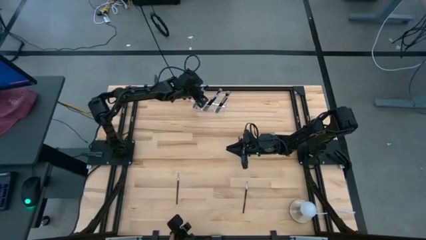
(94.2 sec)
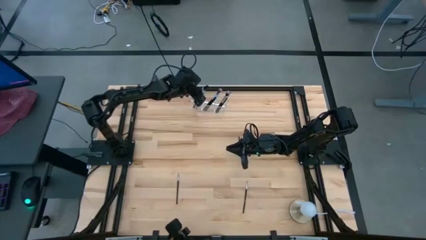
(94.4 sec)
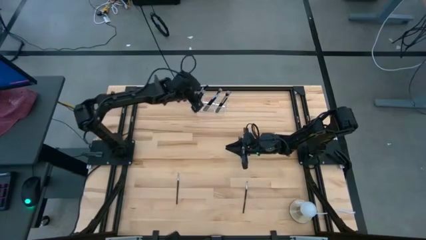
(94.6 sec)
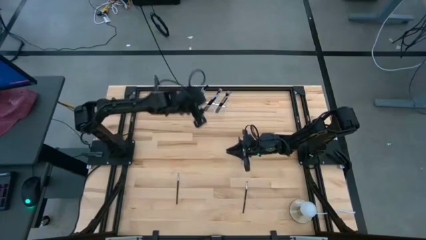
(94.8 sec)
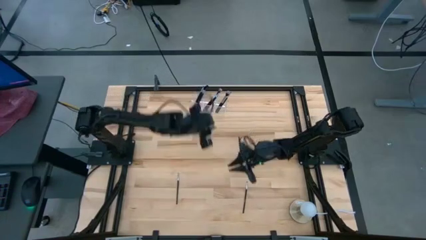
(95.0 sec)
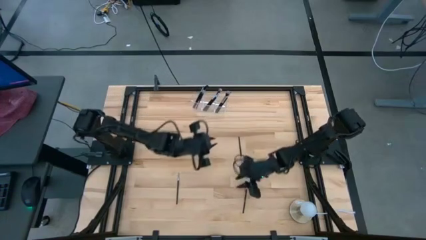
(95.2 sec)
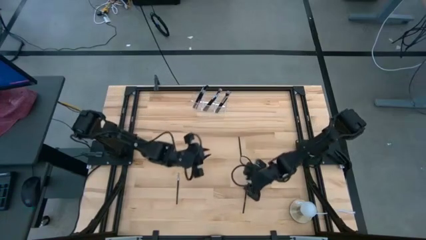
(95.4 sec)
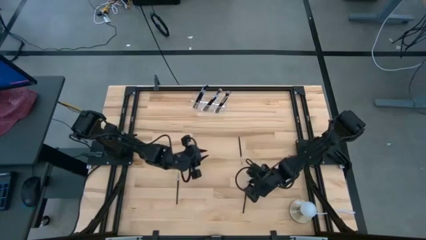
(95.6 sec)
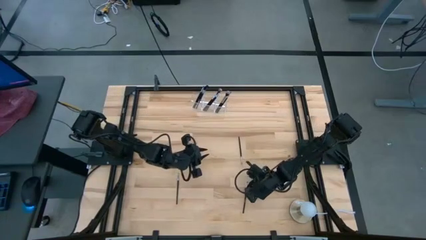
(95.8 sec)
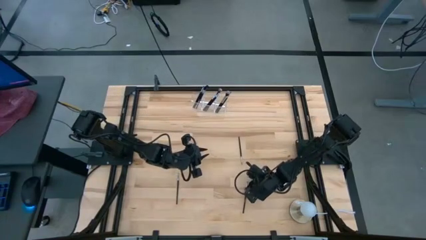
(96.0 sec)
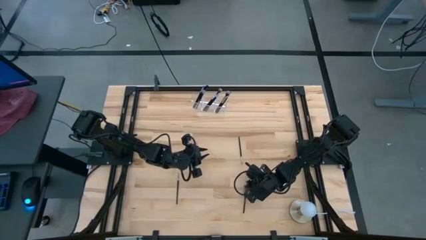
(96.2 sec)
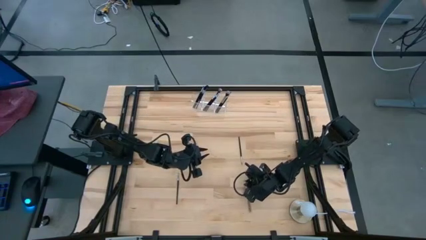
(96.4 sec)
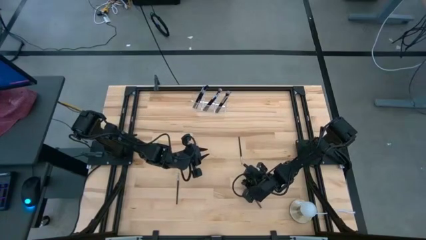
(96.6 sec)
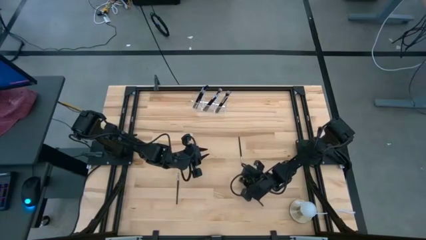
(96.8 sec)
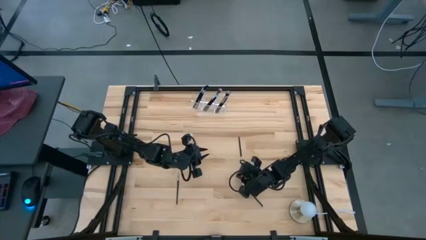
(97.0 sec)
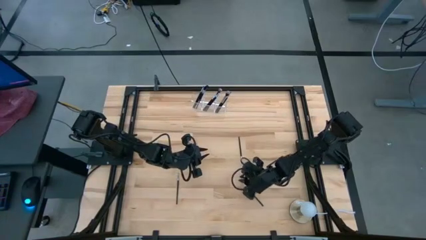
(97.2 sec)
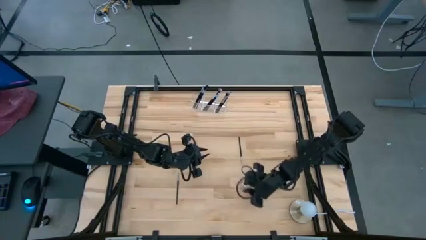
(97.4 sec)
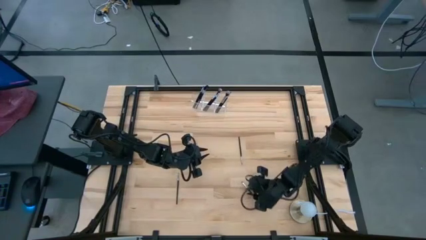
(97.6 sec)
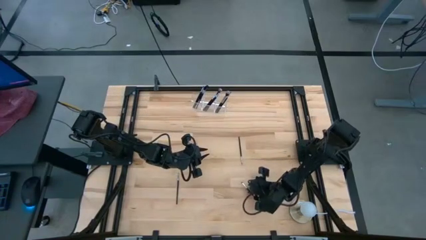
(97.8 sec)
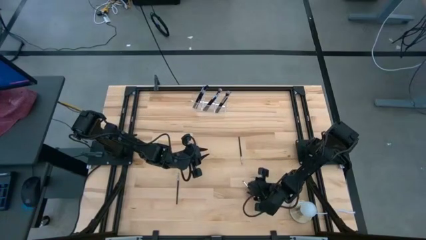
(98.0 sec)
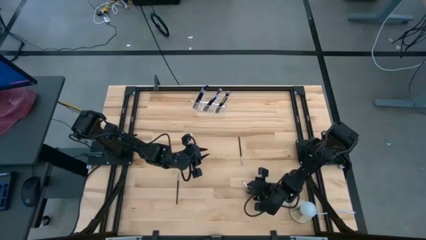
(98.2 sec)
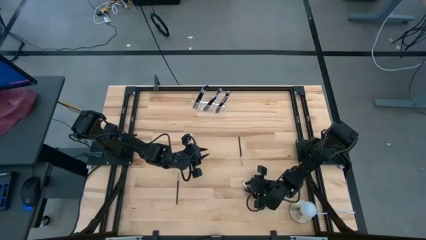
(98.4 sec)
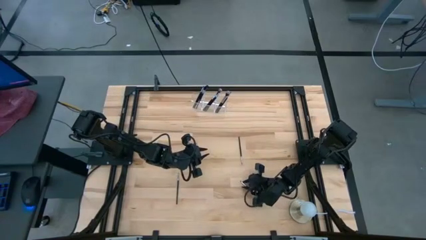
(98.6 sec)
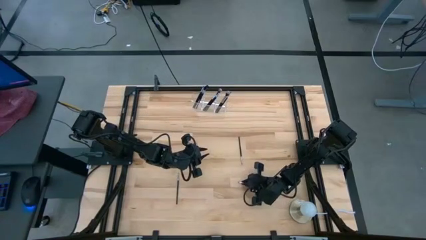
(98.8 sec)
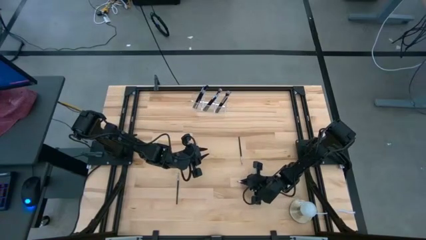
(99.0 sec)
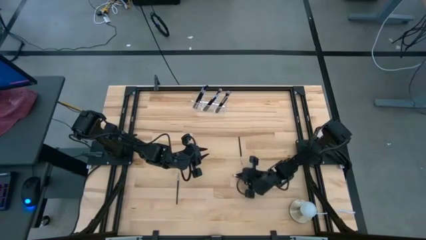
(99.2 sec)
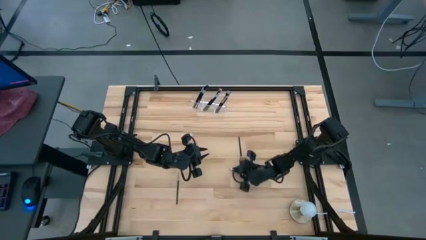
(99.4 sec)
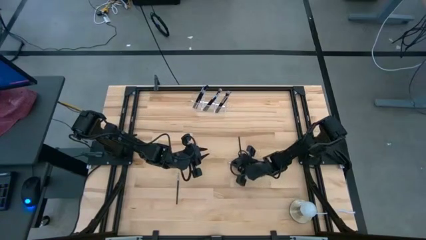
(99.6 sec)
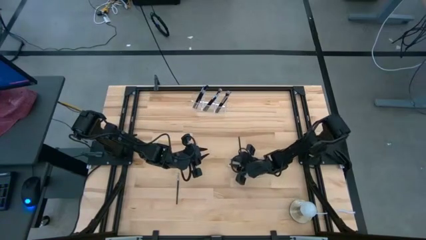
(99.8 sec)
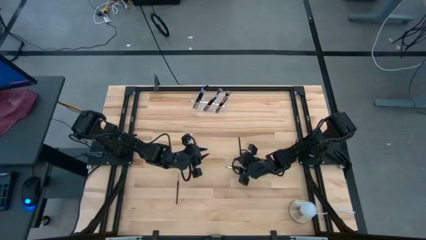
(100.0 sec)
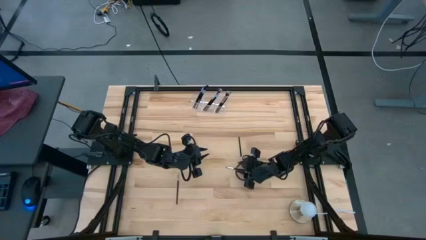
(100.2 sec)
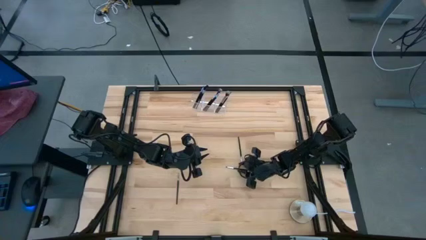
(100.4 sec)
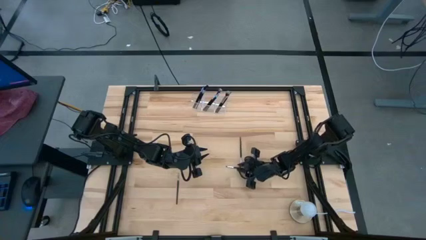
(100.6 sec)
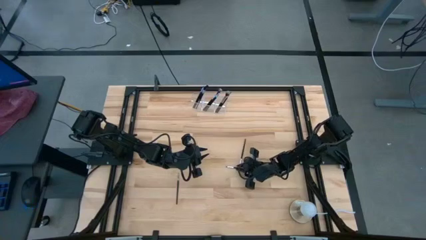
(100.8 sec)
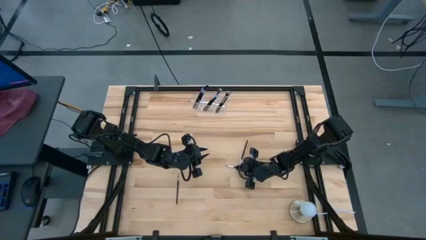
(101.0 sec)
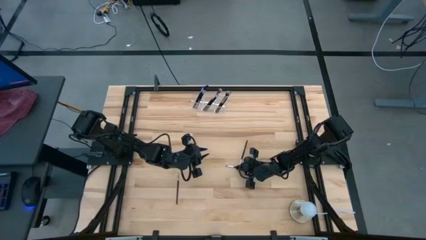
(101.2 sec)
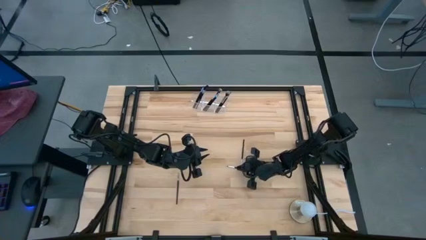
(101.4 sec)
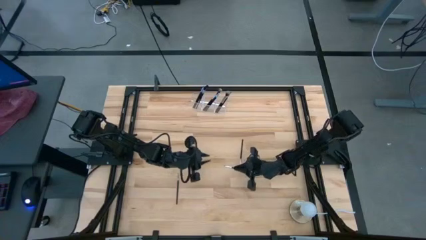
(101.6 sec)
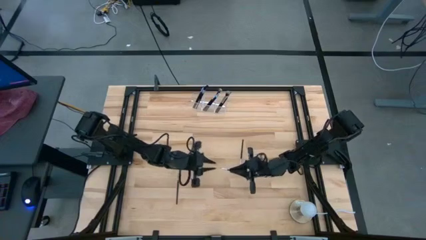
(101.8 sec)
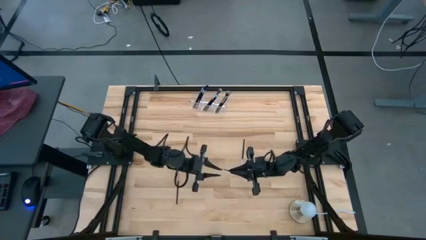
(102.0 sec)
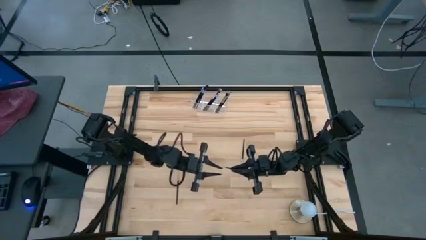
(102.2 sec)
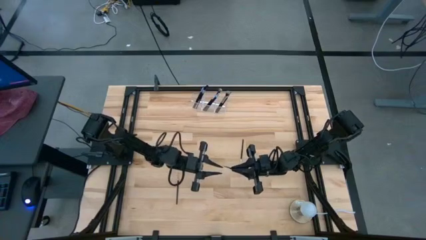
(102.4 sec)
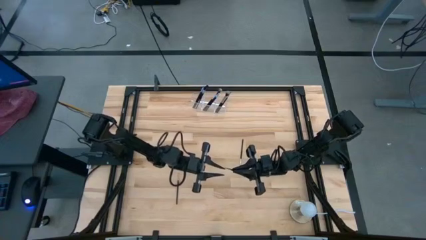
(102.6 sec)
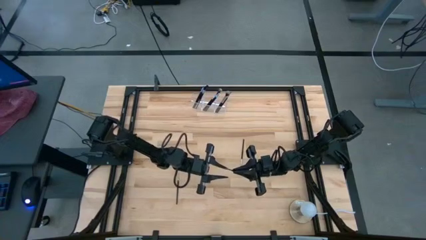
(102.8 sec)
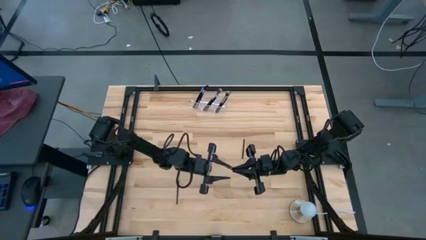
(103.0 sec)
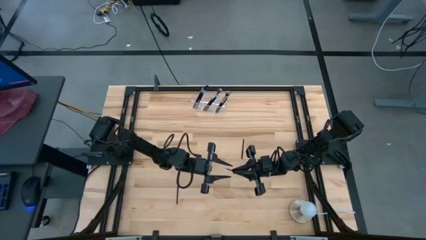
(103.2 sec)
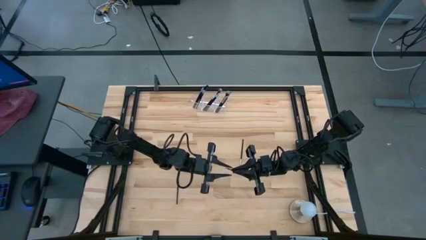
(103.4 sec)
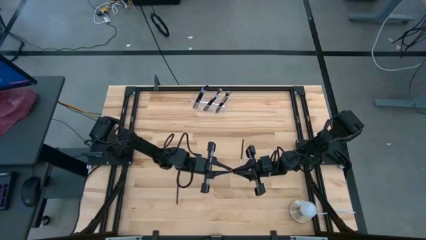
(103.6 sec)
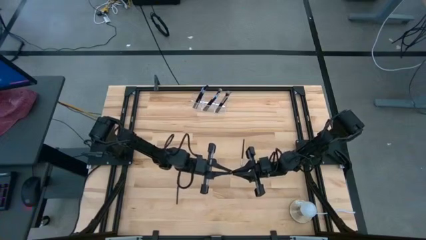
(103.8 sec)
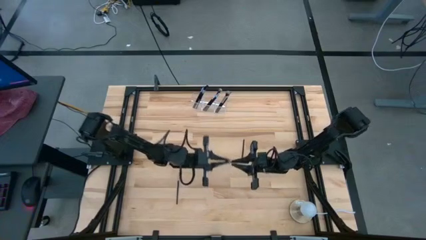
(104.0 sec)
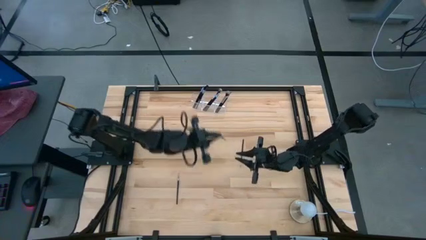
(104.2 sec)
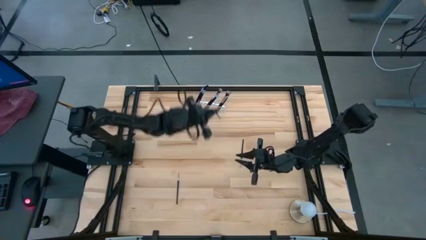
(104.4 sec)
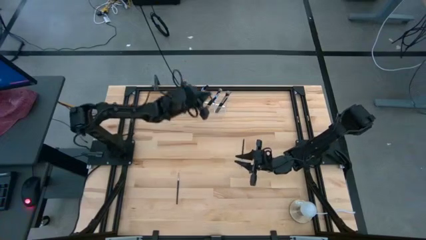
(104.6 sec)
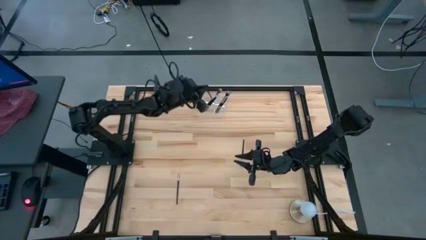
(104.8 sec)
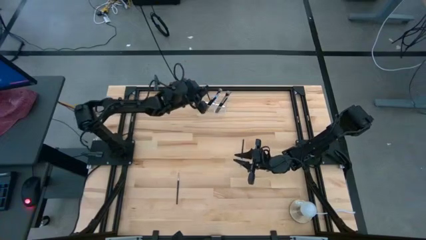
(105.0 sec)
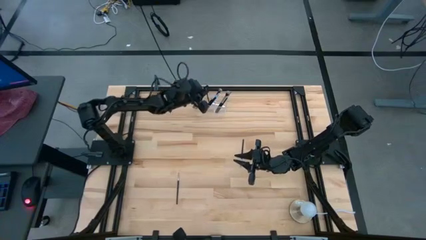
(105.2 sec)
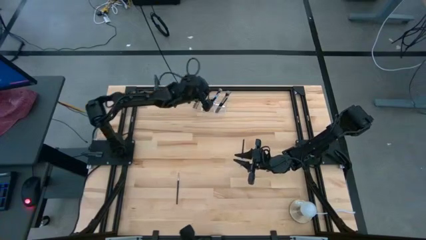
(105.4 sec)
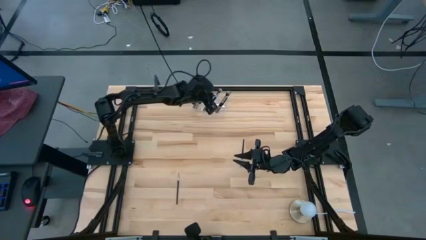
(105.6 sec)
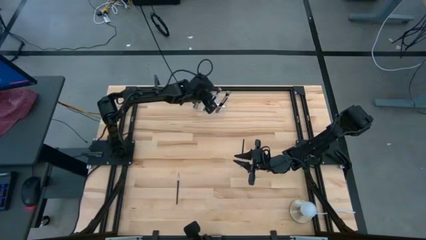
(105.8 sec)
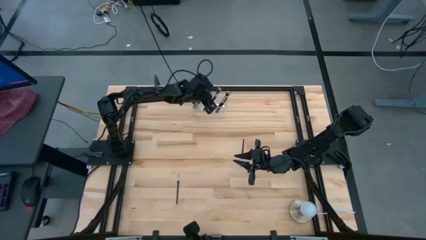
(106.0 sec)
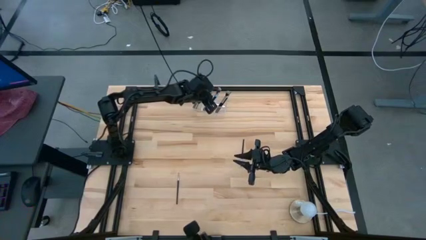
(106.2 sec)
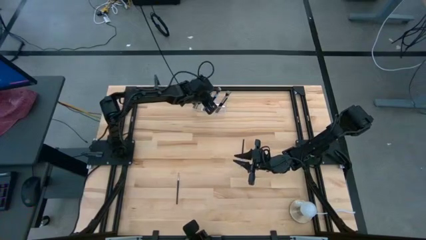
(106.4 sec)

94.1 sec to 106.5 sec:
Task: Put items in baskets/containers
Put the black eyeshadow brush into the transparent organizer

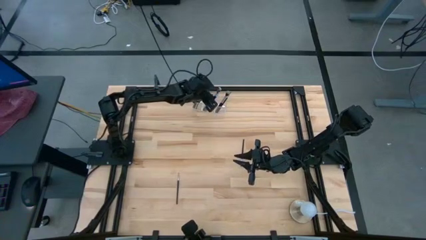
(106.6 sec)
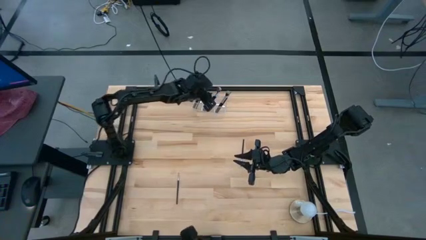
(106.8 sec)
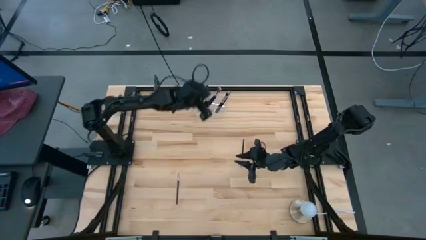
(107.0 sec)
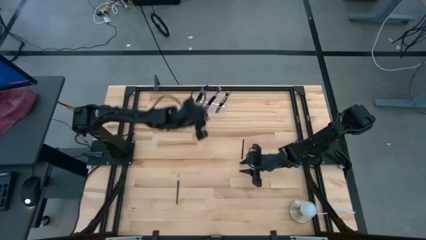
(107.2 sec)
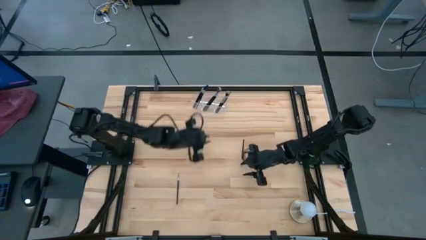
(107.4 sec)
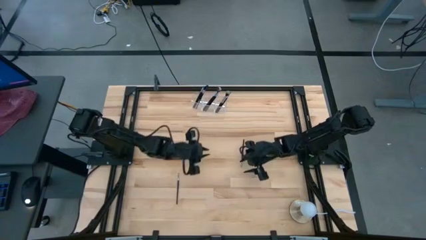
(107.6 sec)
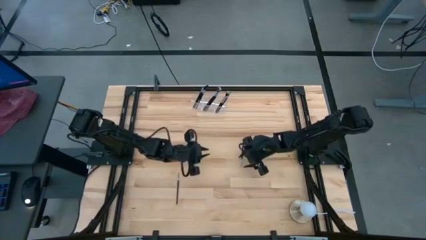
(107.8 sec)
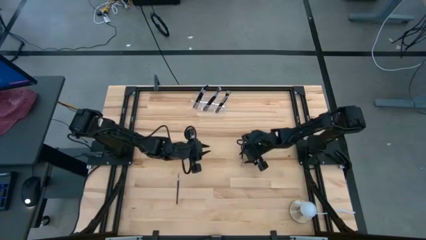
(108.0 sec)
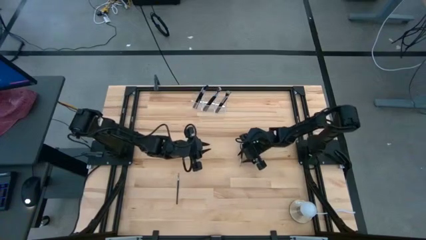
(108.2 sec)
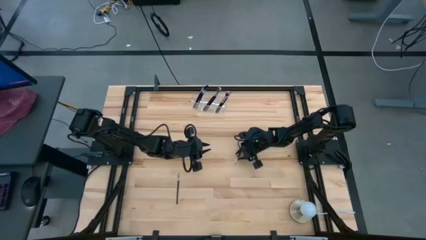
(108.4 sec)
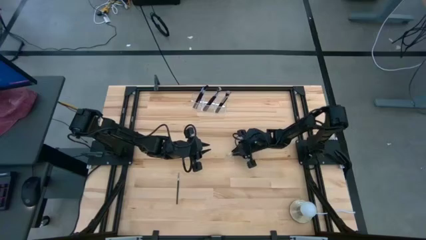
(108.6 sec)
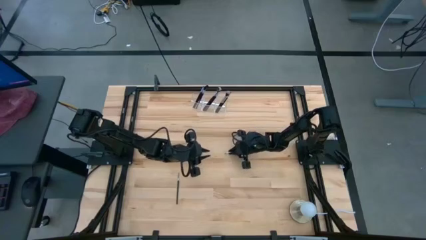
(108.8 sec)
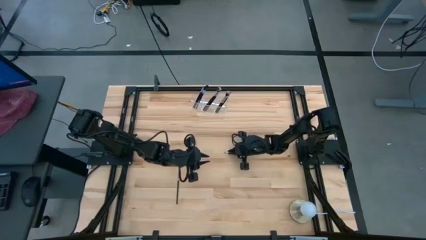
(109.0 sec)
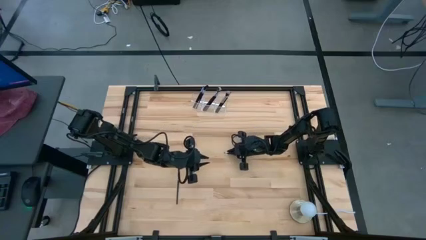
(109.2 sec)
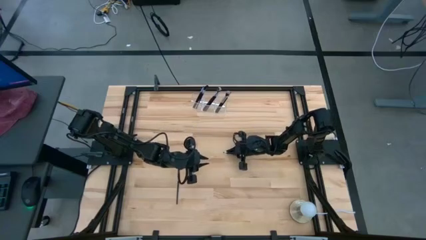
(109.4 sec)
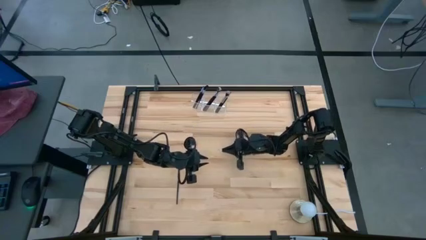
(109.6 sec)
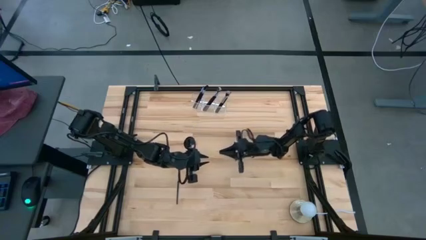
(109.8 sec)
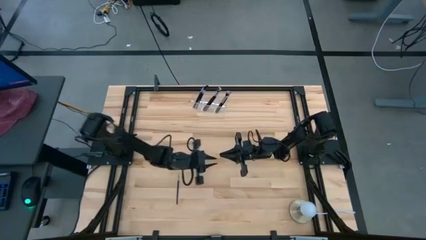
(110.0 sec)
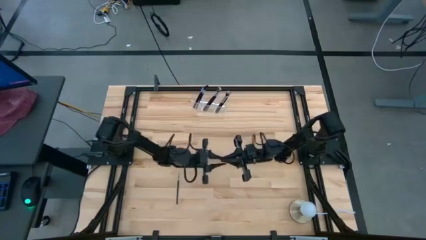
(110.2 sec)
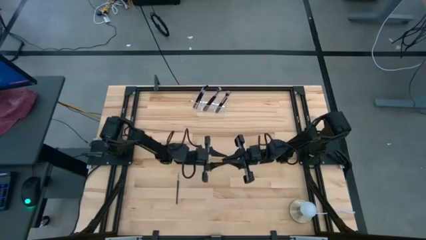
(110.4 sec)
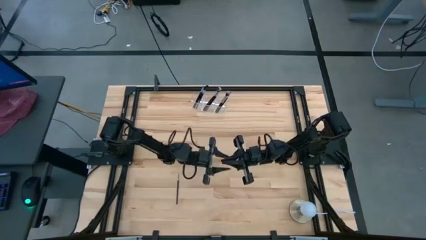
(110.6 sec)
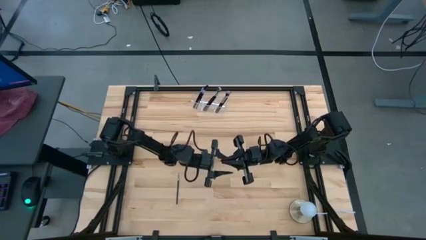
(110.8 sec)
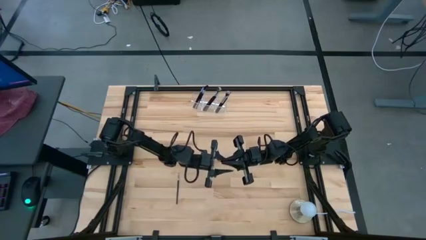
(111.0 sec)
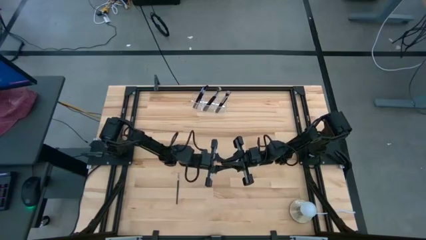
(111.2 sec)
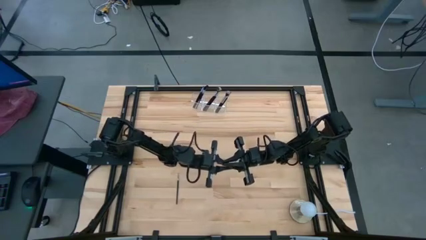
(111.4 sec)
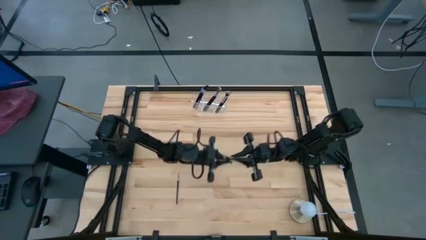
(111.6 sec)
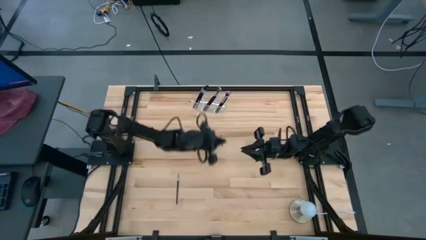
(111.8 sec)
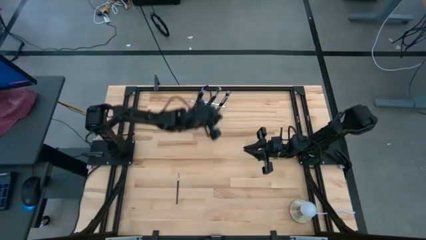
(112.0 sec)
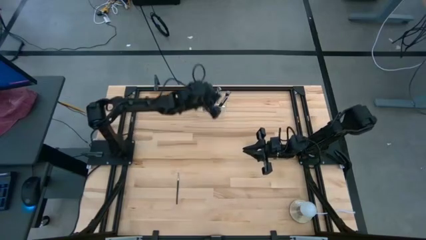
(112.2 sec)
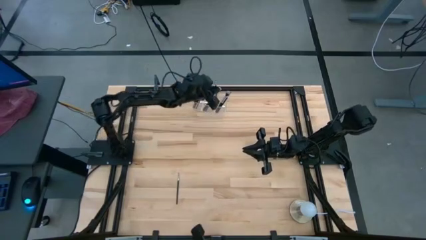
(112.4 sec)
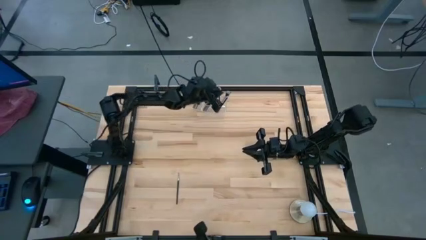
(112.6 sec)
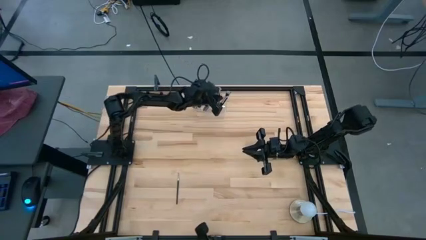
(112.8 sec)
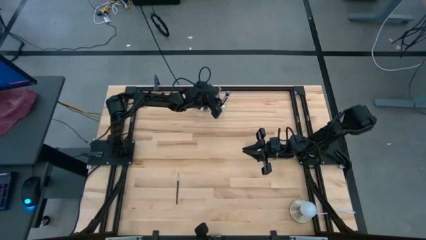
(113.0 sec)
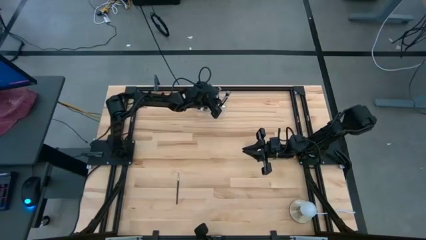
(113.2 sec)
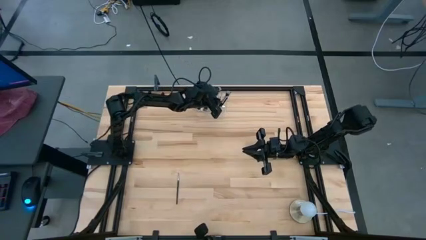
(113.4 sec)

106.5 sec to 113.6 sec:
Put the black eyeshadow brush into the transparent organizer
